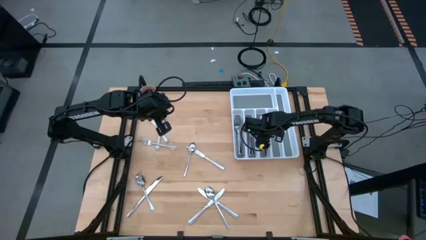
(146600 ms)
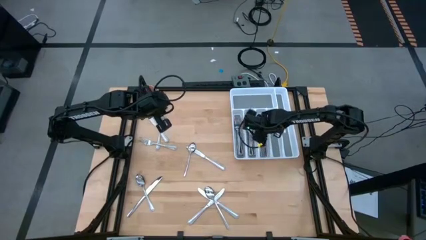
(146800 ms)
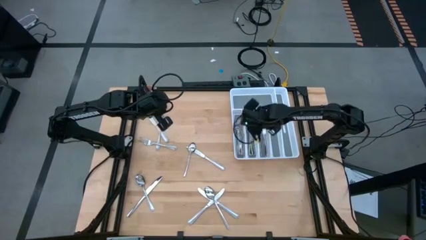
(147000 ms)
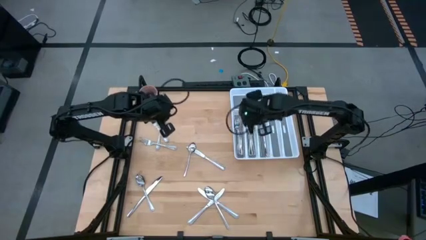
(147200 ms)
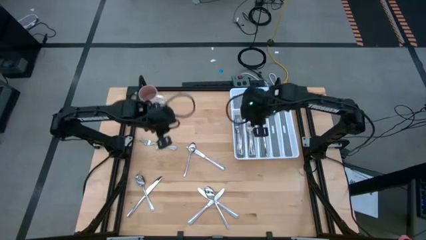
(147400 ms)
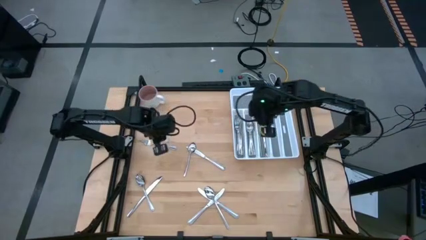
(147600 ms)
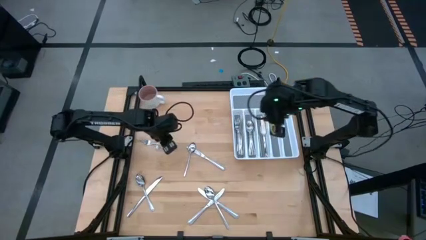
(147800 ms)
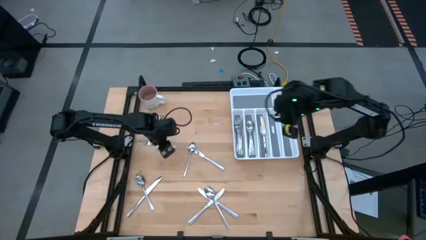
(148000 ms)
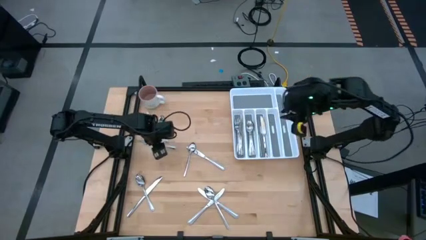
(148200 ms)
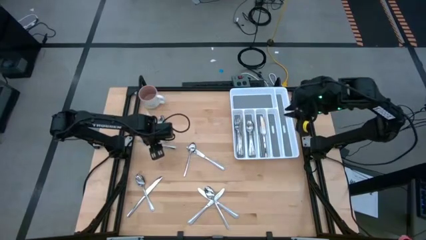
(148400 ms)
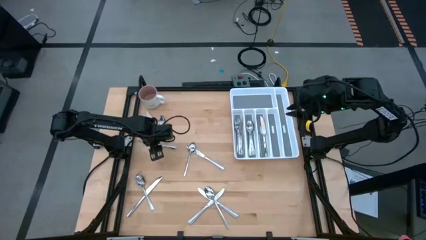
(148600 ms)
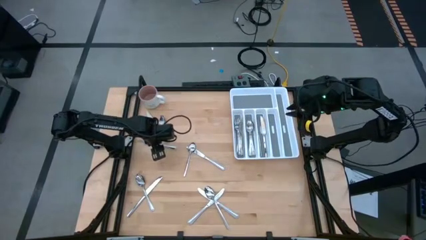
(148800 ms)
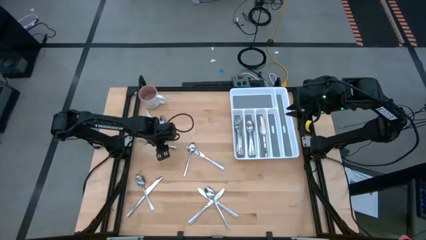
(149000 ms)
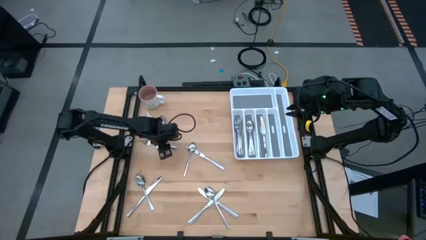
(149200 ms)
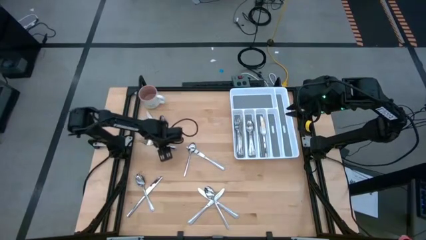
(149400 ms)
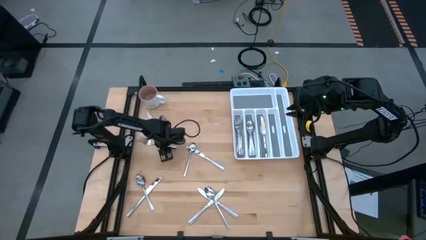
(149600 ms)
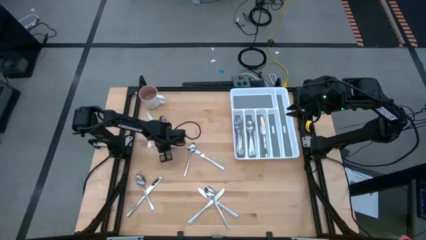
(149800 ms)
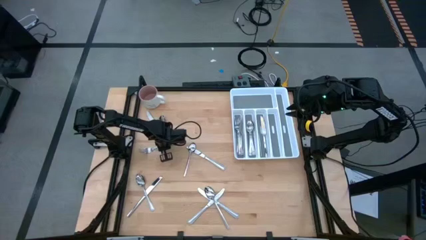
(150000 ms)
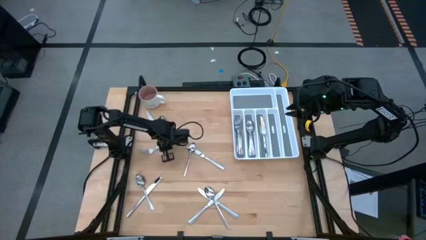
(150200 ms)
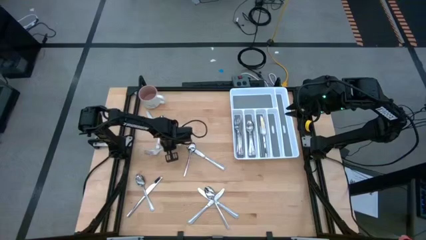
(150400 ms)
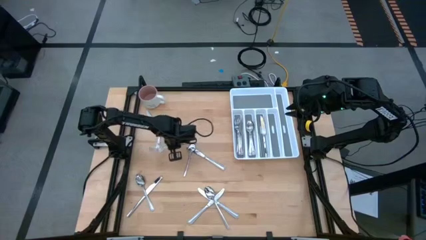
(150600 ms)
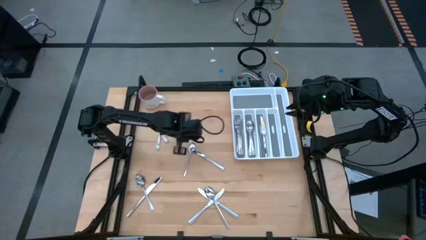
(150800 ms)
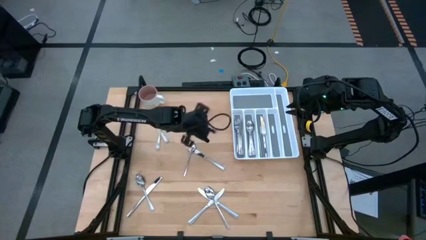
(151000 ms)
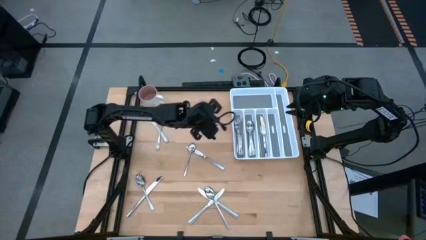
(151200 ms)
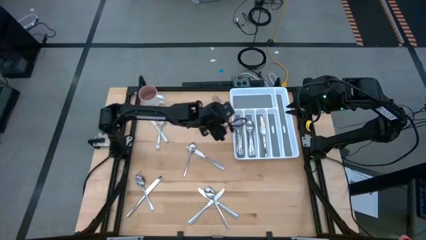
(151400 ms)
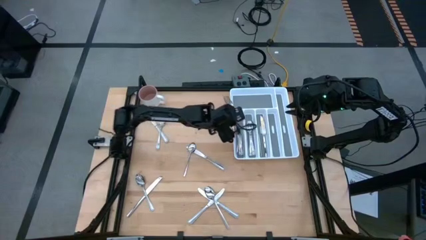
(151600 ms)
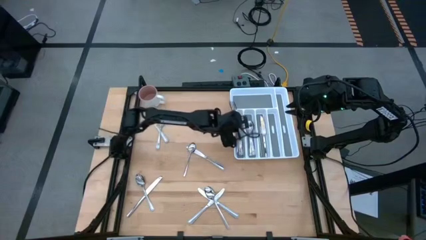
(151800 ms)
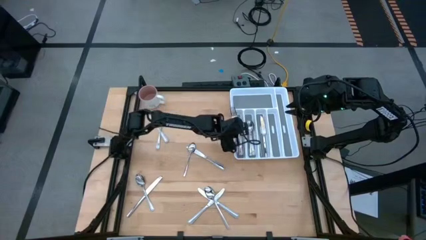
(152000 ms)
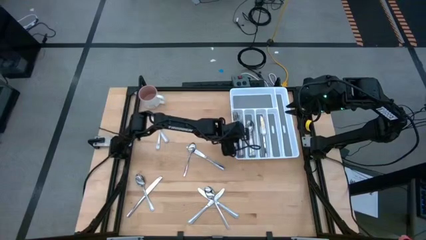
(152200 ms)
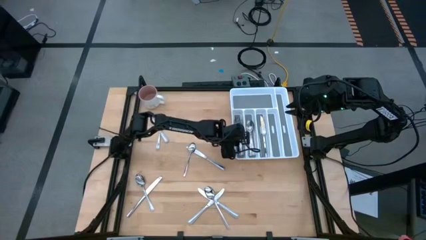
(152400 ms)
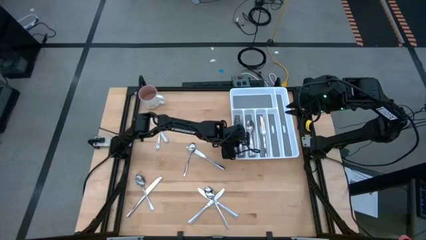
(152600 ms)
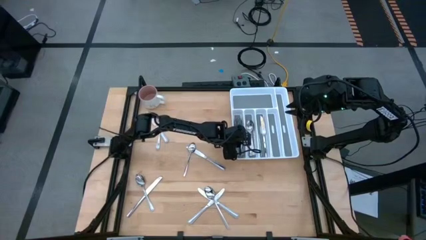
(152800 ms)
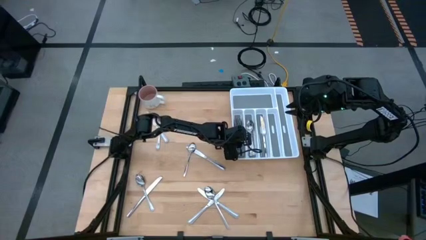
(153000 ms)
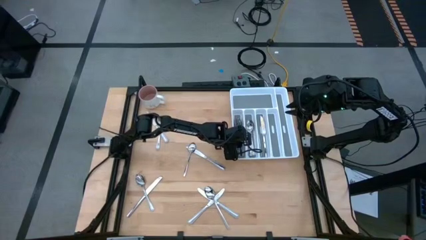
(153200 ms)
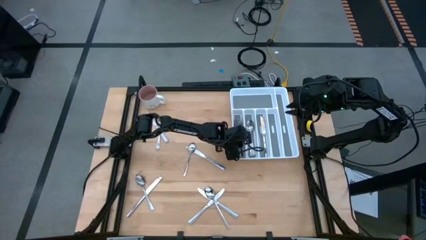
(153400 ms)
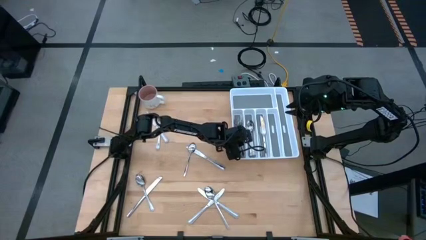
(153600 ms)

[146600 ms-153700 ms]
Task: Sort silverware
Put the silver fork into the silverware tray

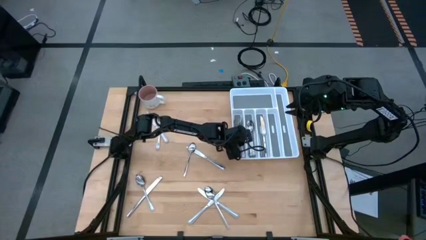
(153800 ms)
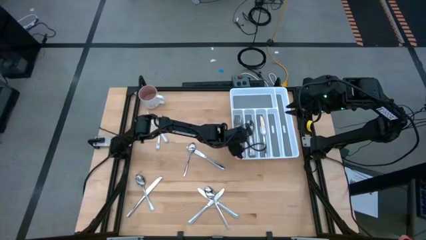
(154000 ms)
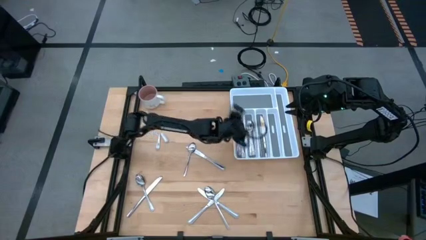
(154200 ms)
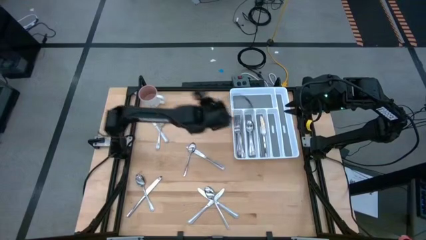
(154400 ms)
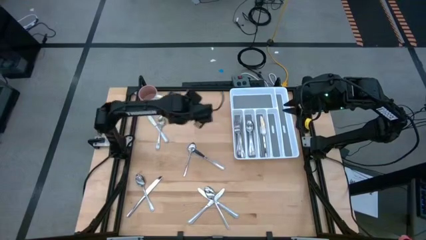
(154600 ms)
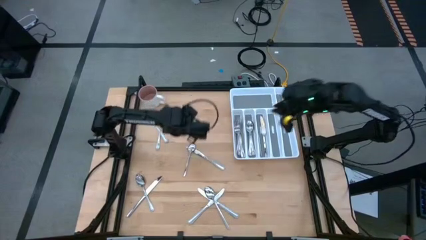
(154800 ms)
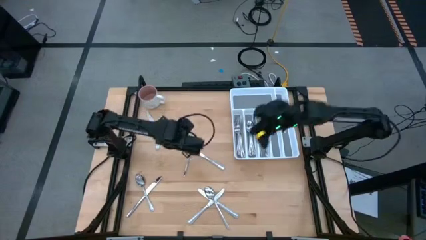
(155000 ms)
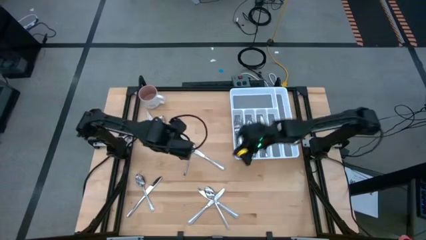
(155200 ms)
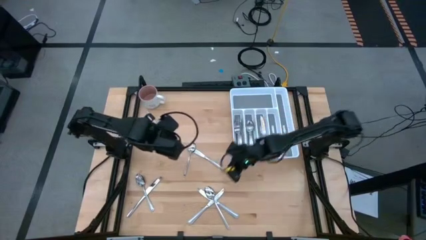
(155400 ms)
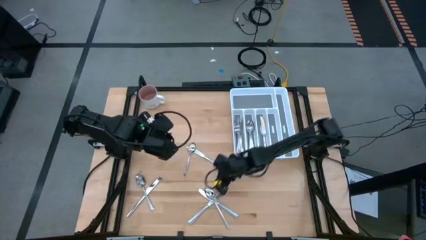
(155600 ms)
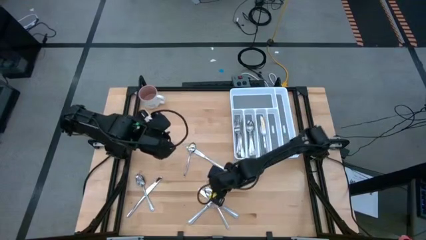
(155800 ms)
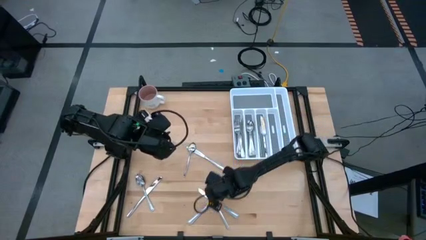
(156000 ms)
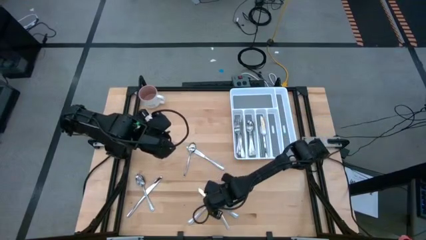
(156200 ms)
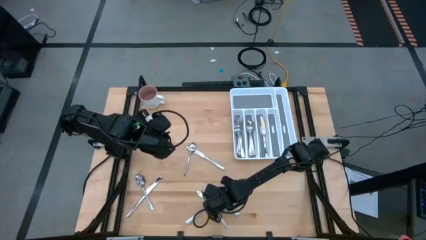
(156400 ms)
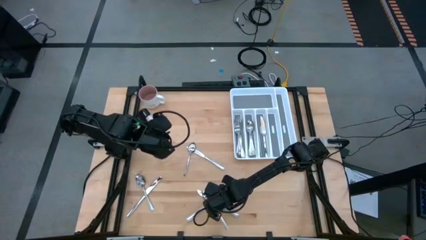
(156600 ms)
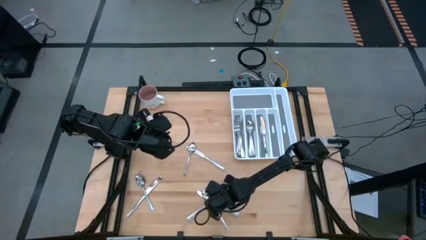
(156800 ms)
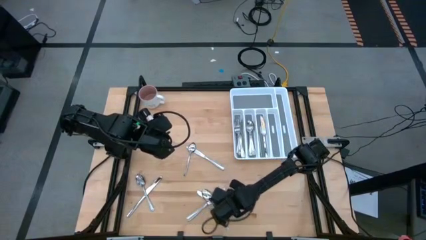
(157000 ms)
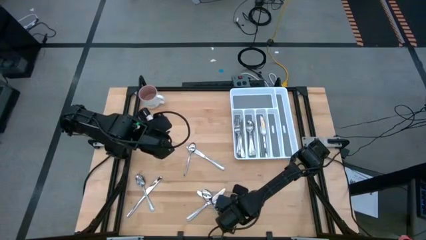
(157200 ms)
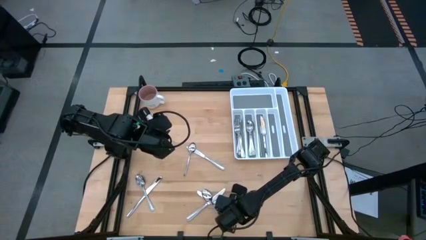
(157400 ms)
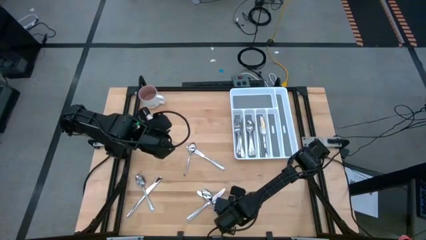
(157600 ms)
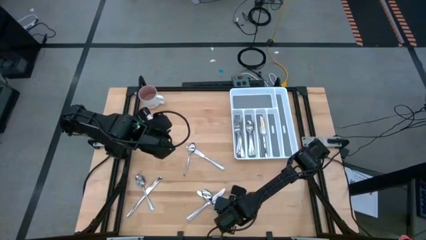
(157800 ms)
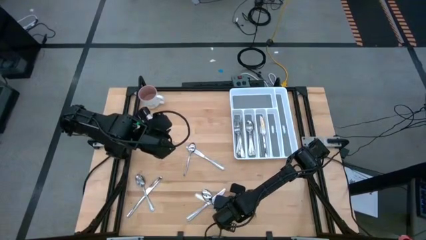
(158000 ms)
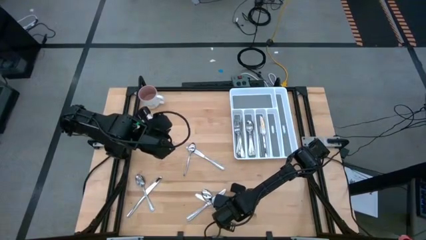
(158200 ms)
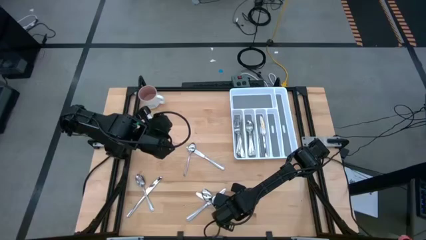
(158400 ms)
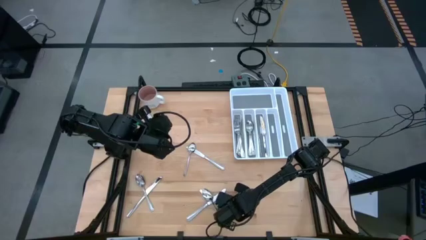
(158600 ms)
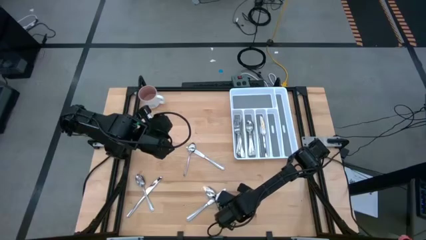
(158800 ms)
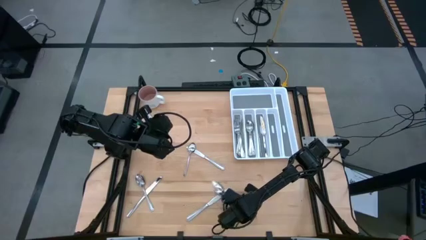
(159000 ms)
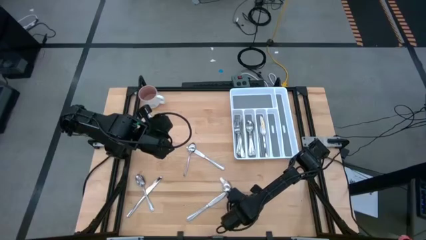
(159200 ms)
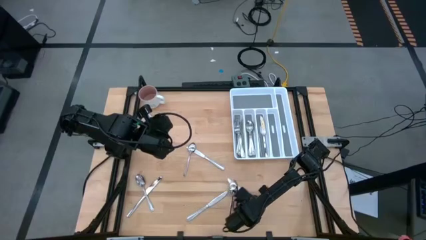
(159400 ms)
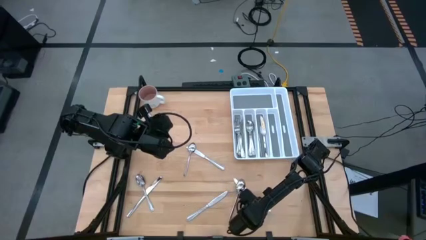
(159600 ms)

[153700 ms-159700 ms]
Put the silver table knife into the silverware tray

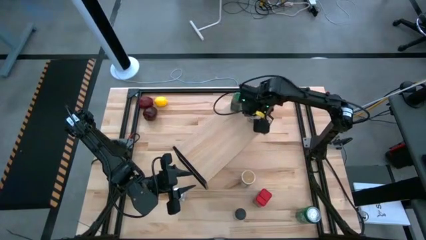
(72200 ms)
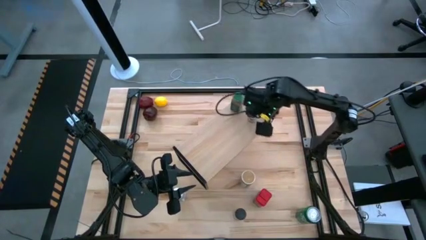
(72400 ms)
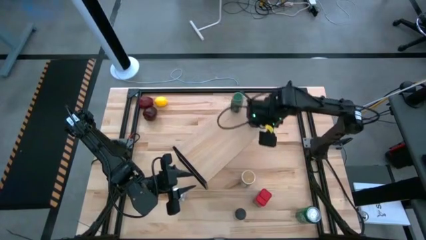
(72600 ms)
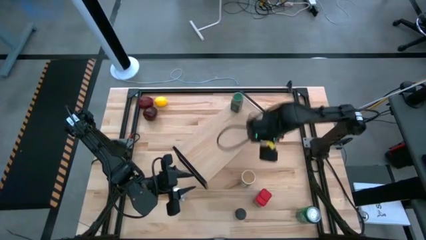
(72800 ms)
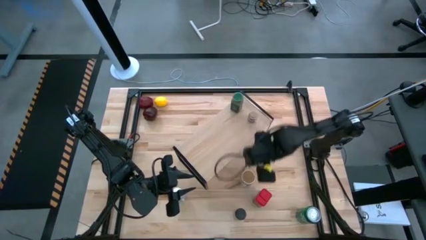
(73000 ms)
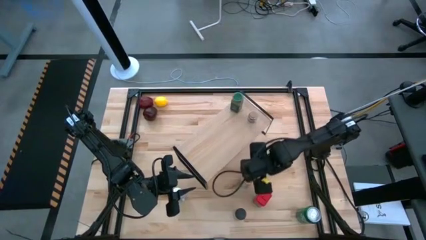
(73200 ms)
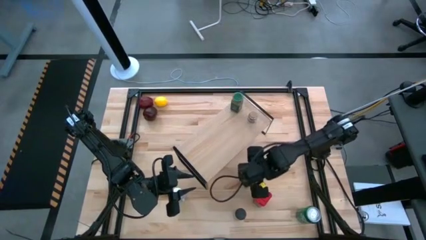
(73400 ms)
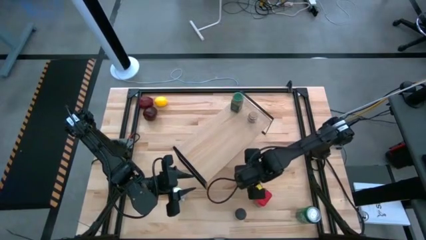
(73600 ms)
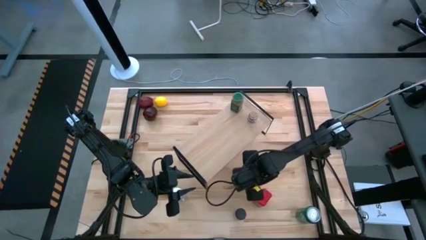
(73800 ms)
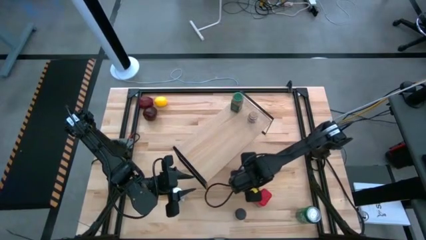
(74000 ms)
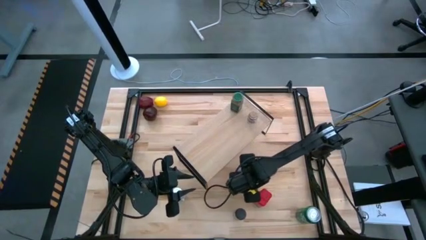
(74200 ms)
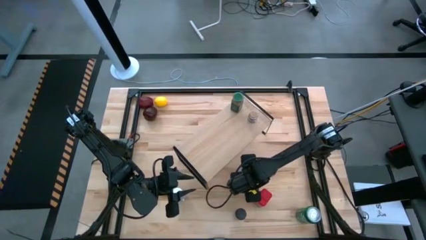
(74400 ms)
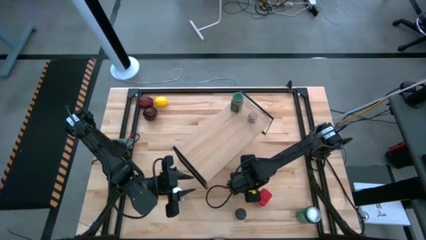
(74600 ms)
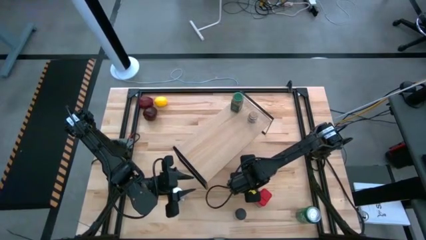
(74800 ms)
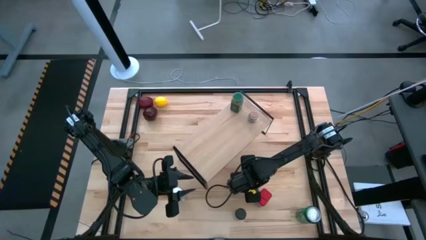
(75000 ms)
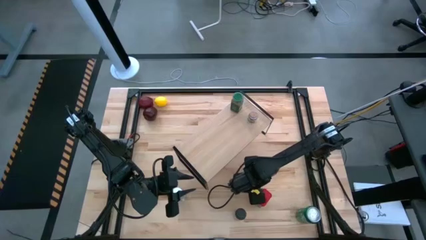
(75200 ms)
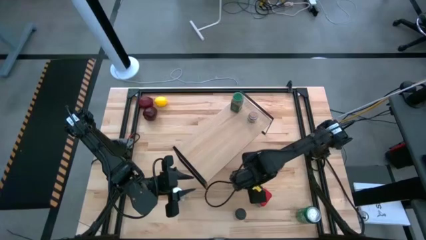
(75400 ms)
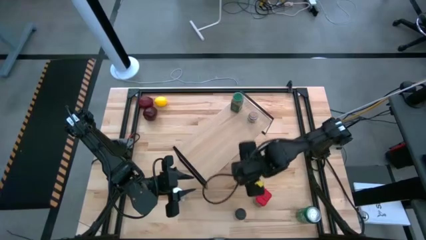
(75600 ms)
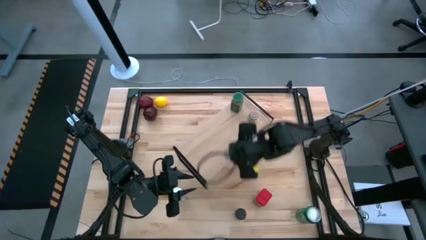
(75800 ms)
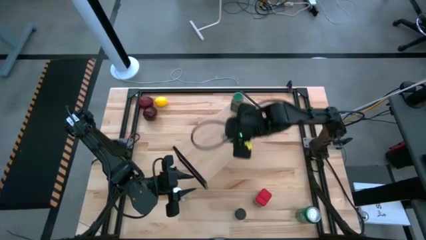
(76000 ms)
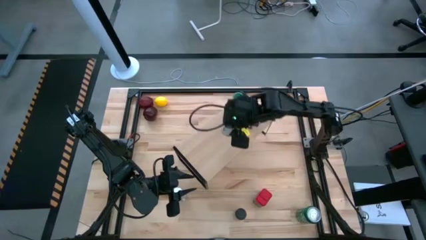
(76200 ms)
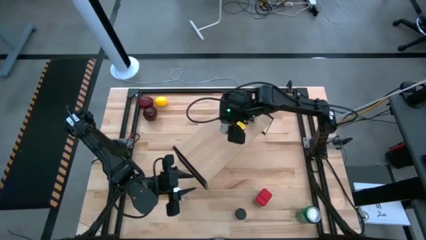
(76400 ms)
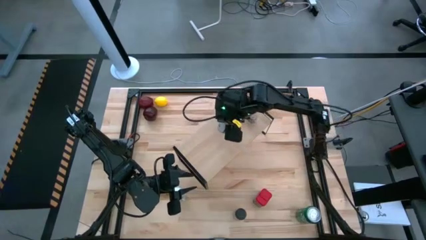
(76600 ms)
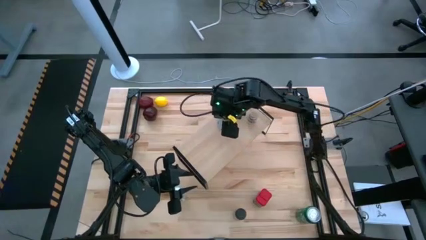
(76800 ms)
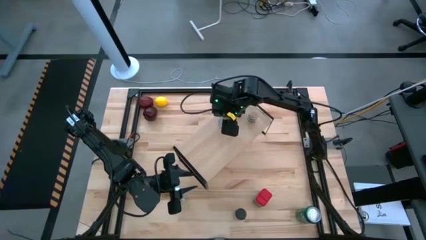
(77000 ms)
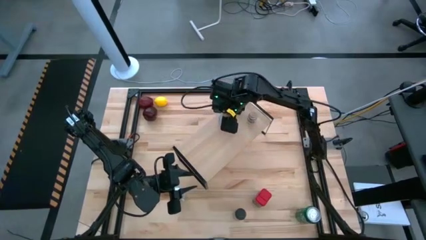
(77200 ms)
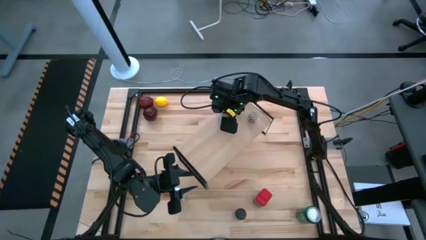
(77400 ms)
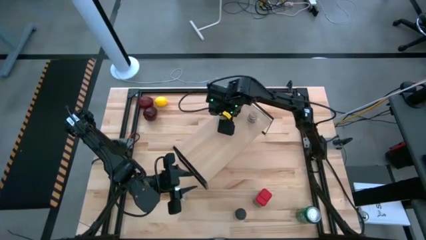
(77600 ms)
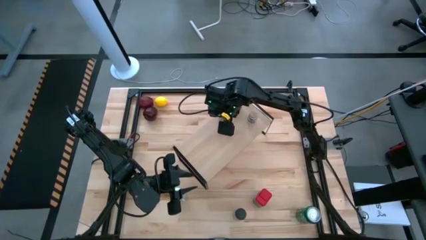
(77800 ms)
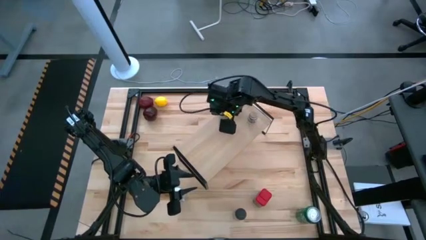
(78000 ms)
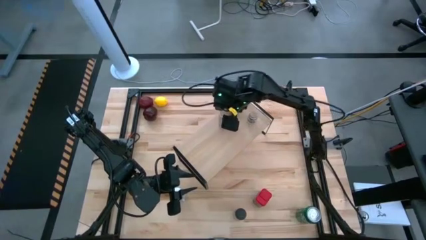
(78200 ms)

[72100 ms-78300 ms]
Task: Shelf spices
Put the gold seasoning bottle on the shelf
